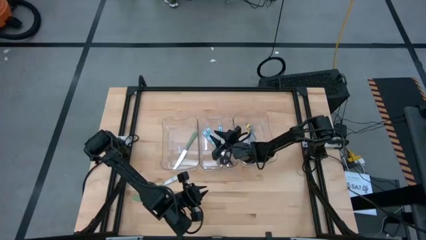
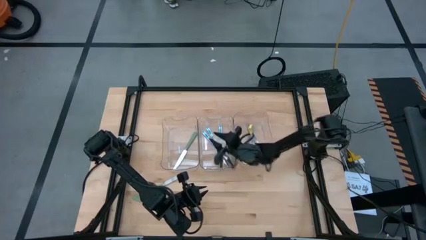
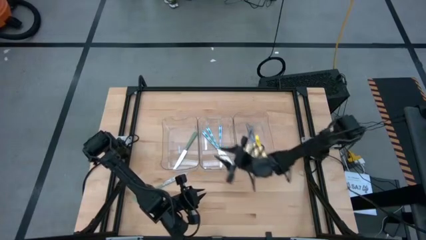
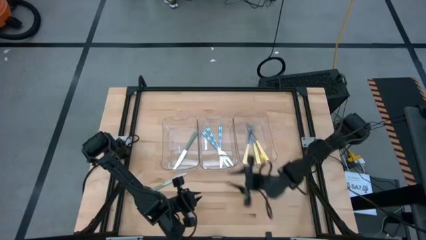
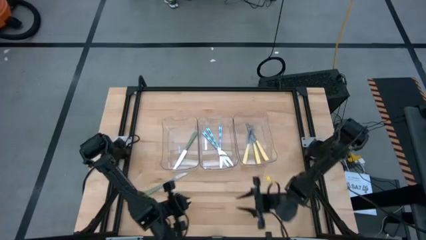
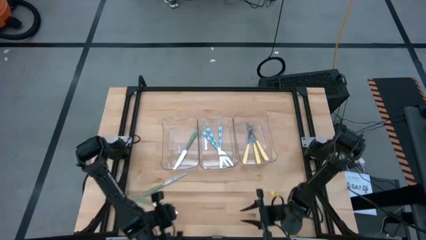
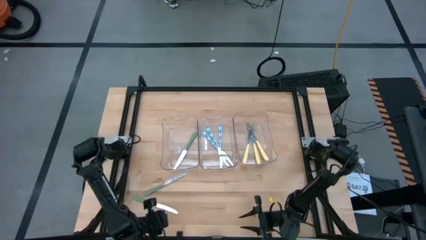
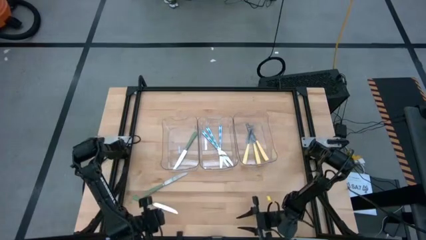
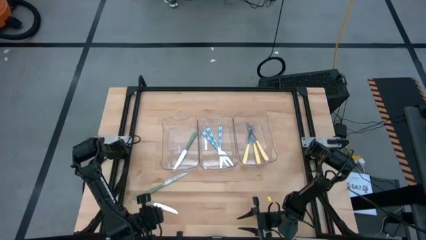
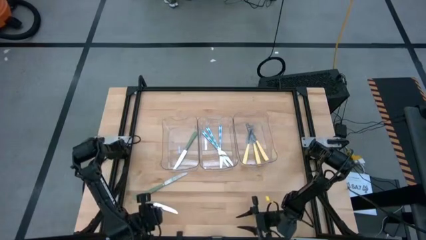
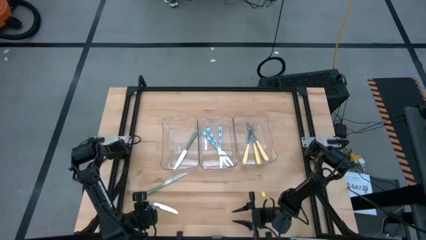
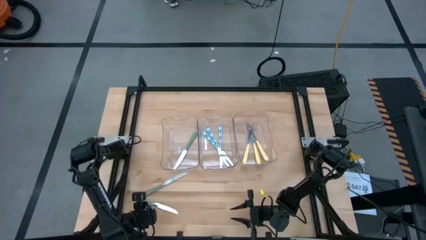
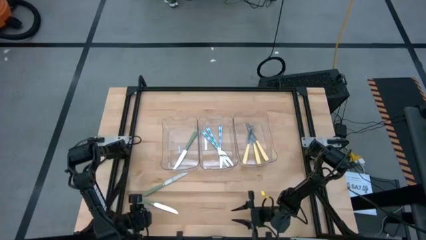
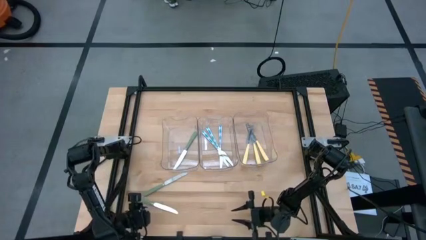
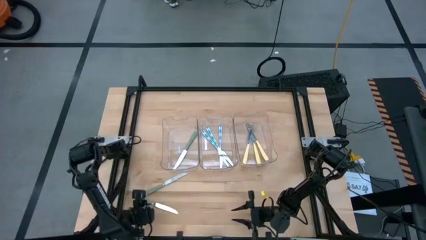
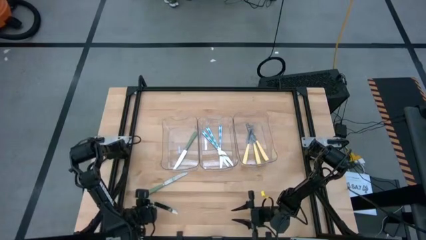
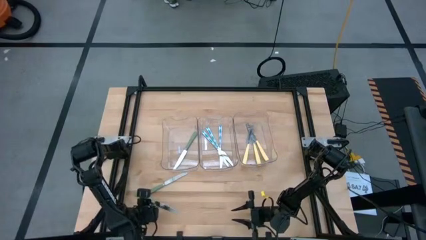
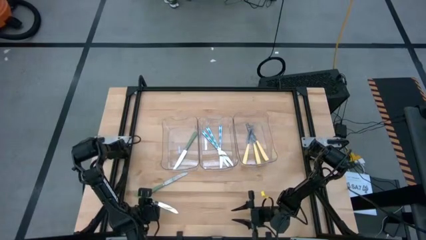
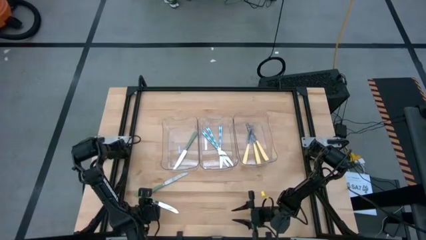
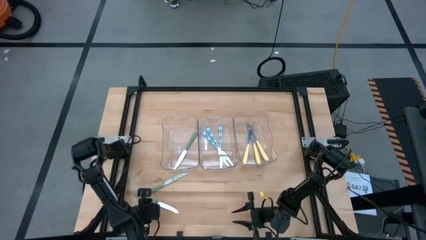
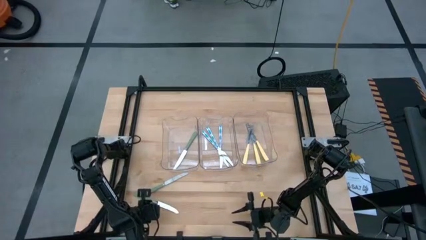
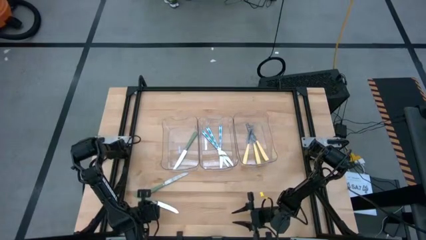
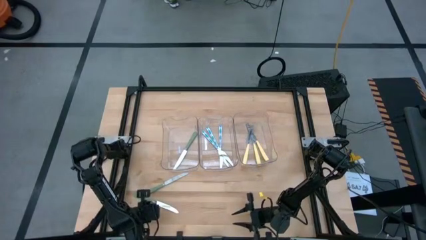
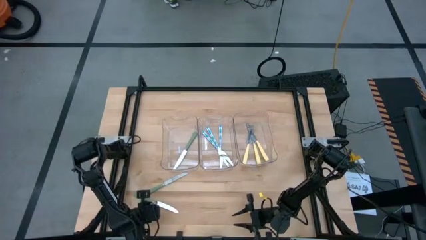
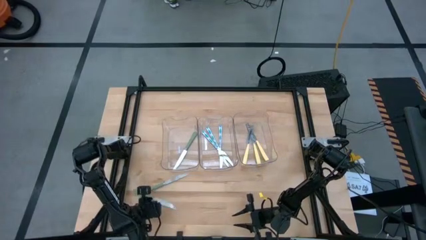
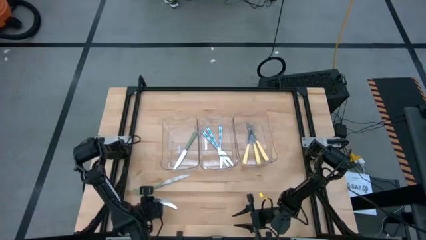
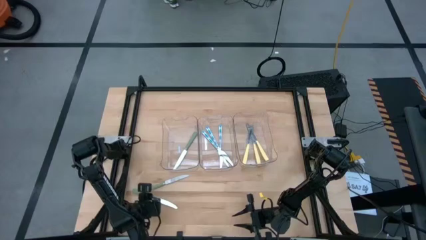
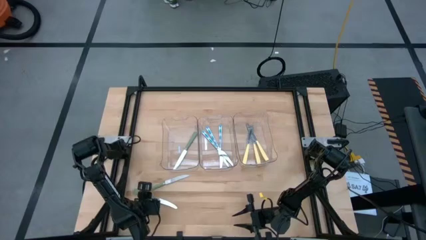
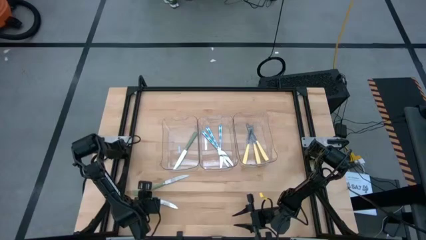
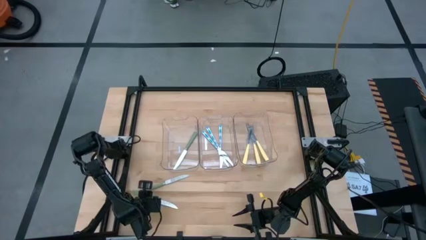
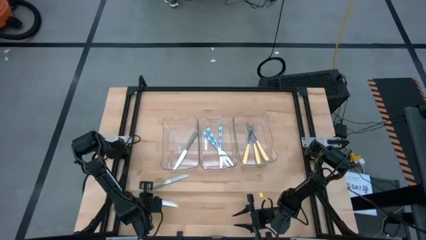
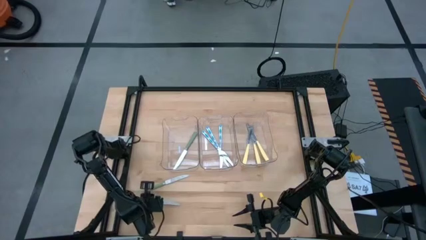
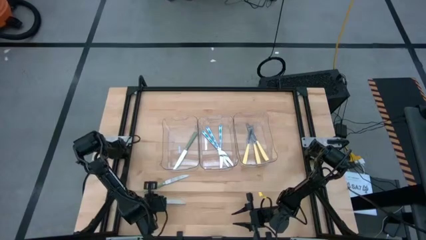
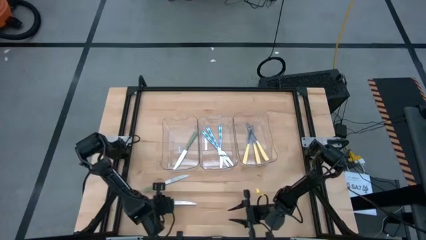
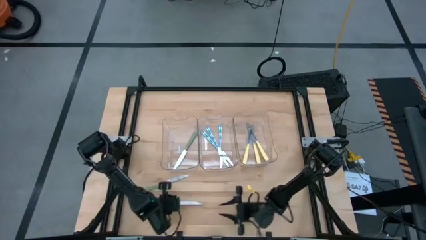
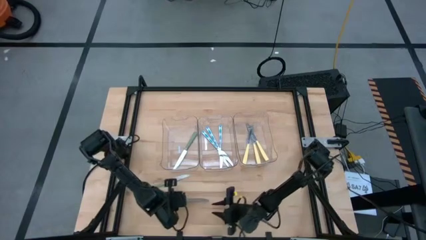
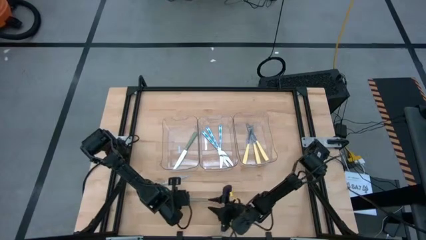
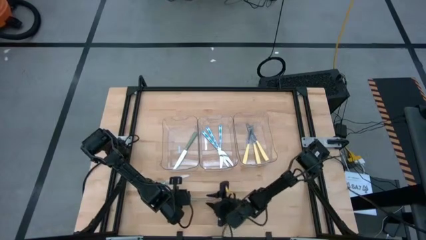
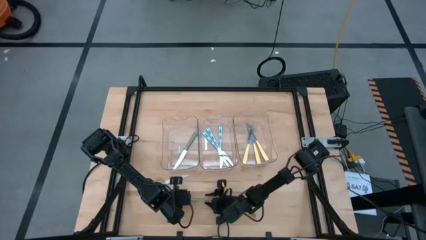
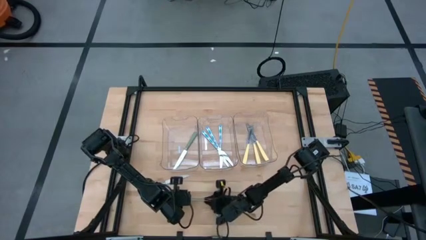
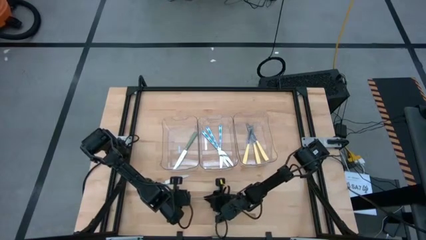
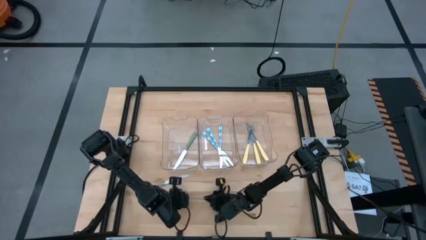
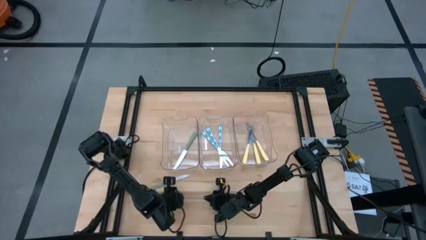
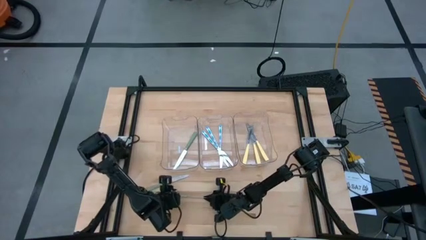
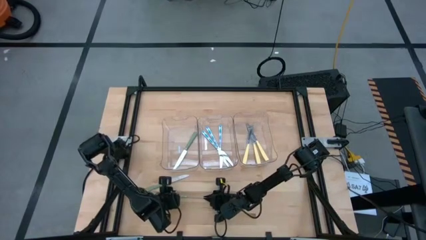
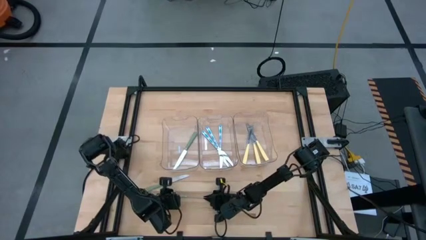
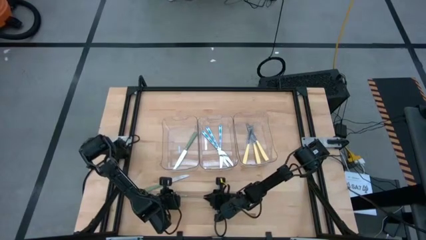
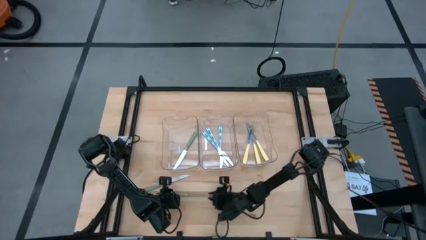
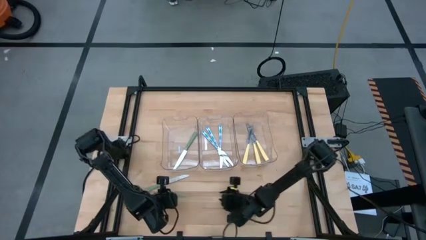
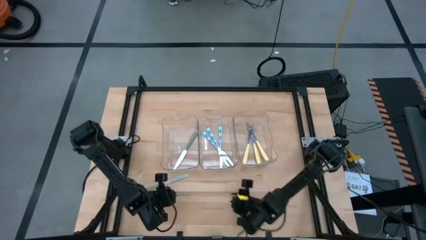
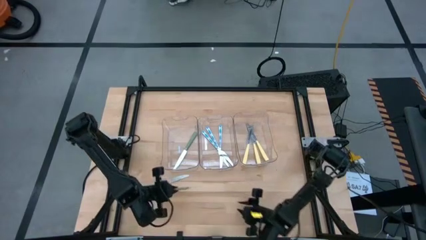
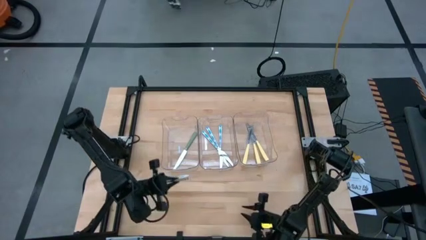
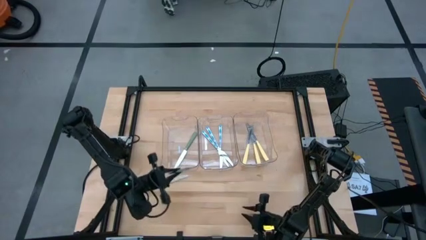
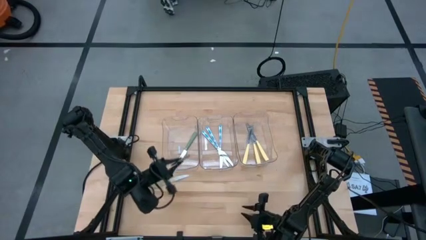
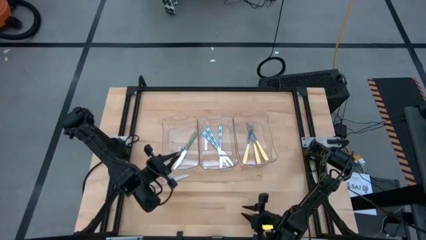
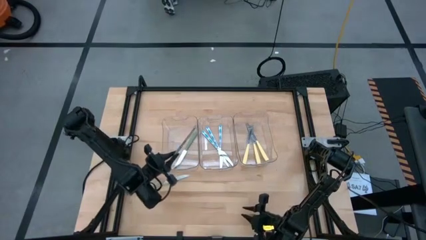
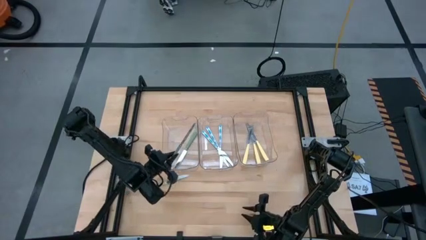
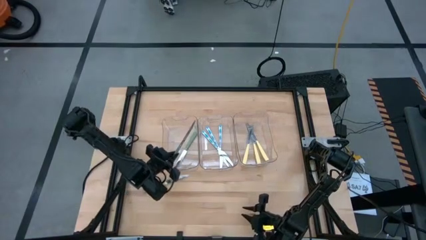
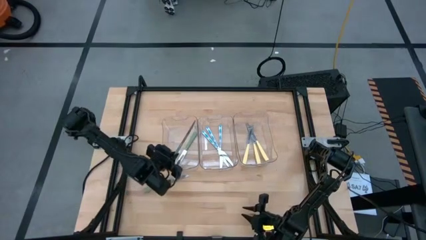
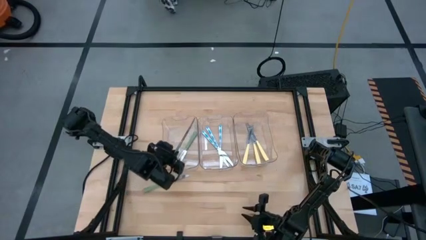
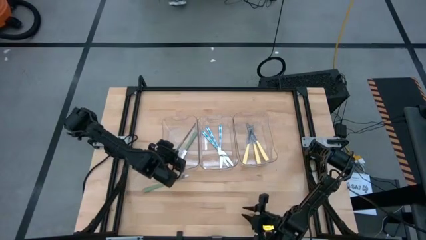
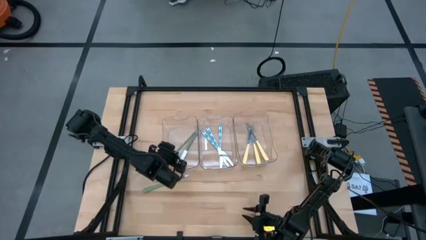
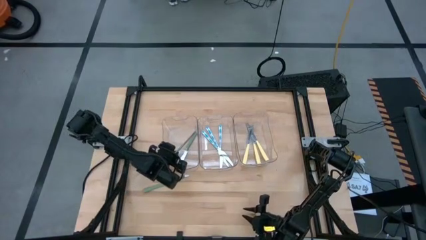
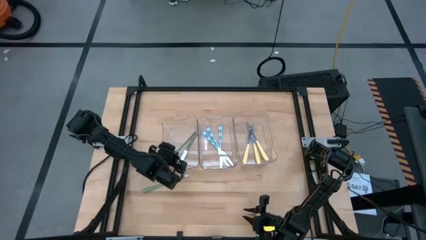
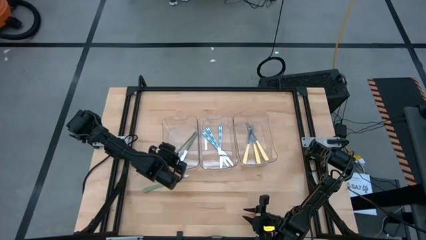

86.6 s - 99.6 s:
Task: Sort silverware by color (type)
Put the bottom green knife into the left transparent bin

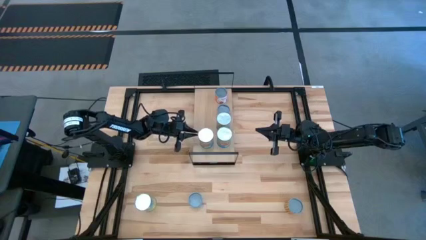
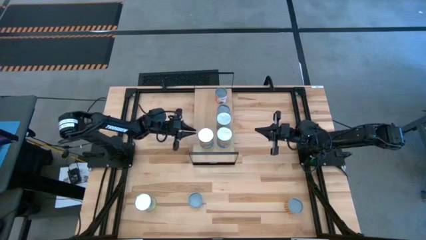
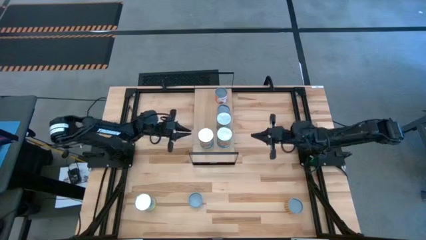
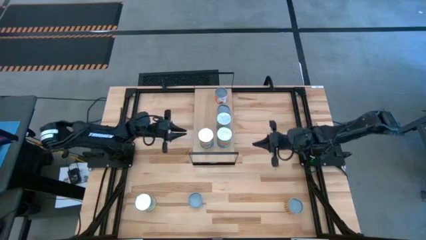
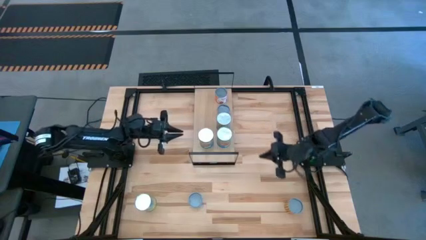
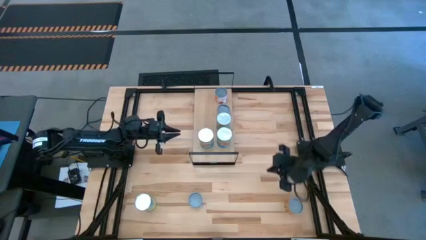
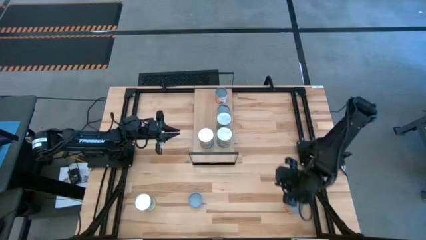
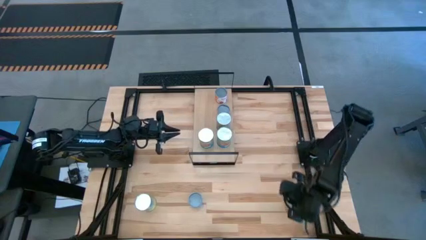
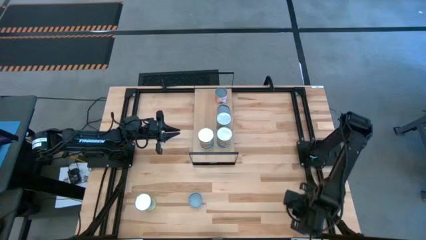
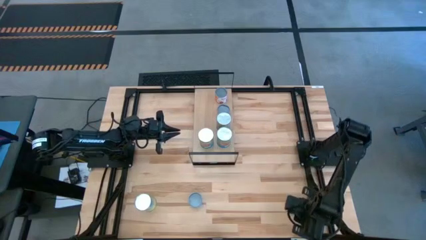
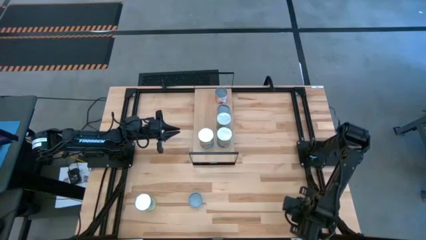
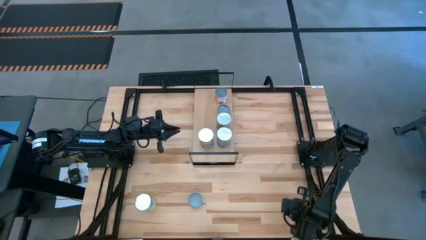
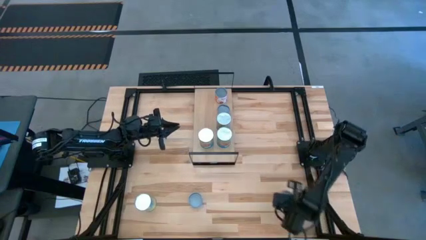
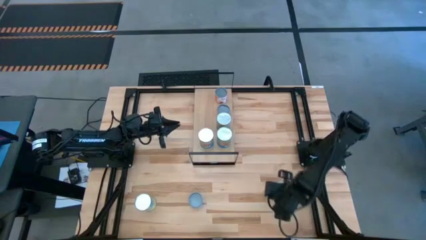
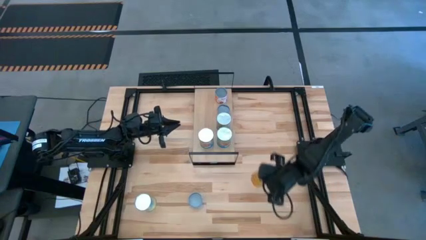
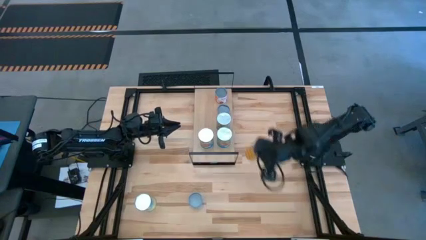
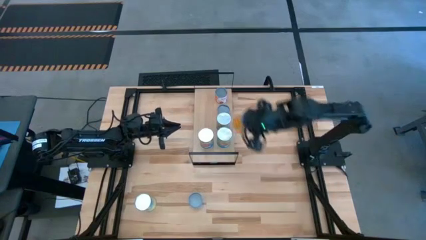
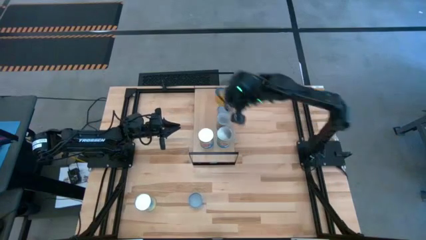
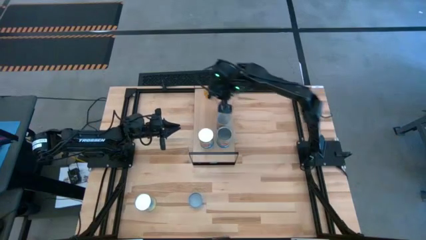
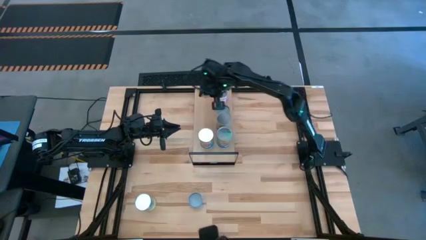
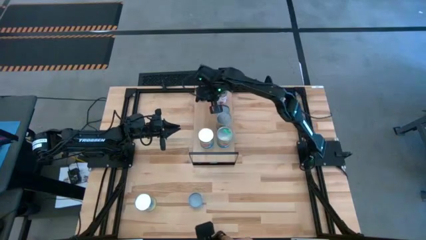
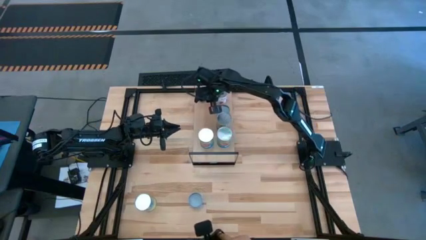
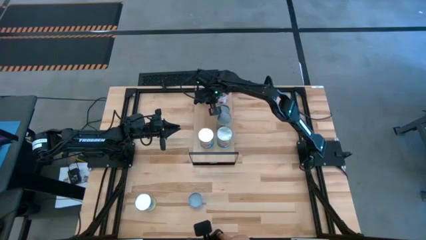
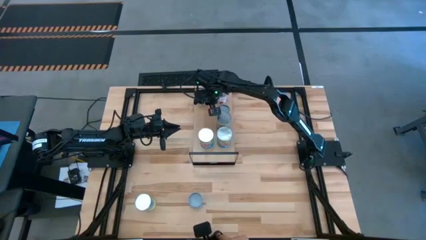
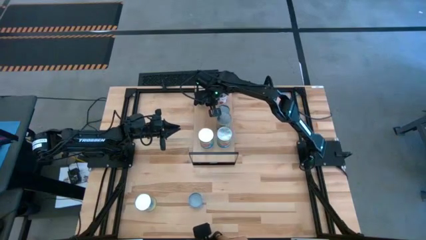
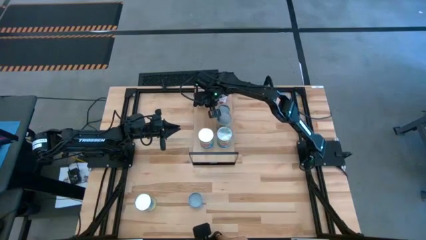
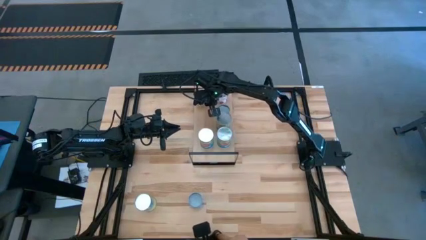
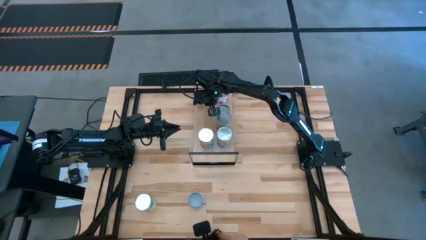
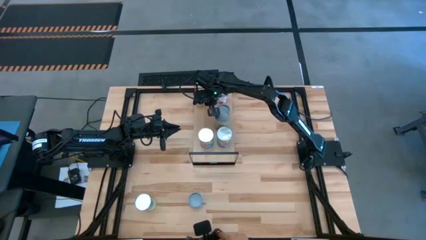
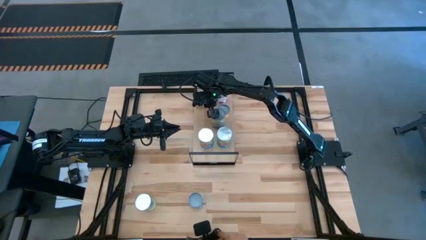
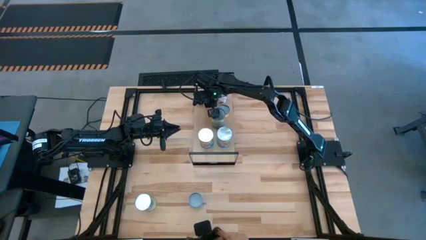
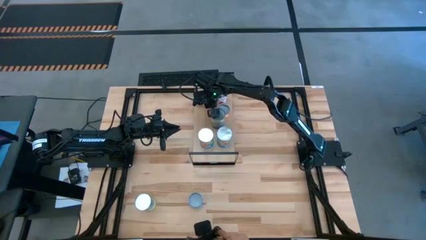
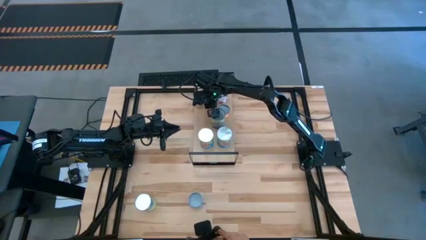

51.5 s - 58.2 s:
Task: Pick and place cans onto a shelf
Put the cans of beans and peppers on the shelf and align them with the other cans
